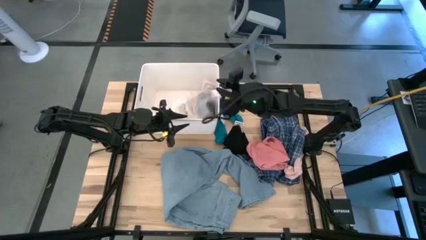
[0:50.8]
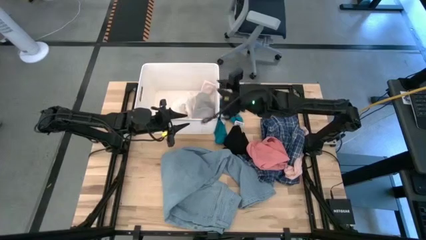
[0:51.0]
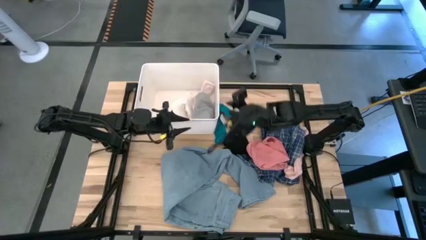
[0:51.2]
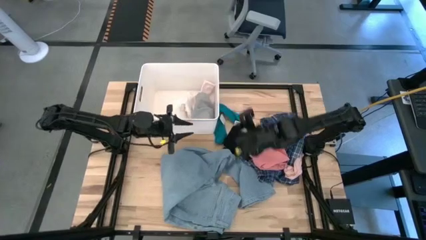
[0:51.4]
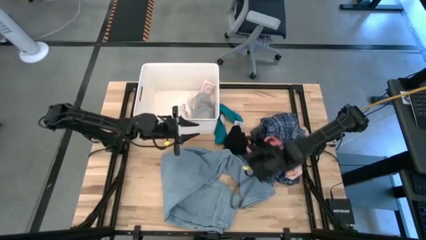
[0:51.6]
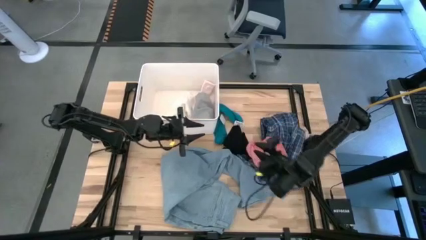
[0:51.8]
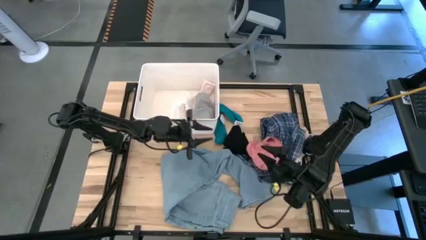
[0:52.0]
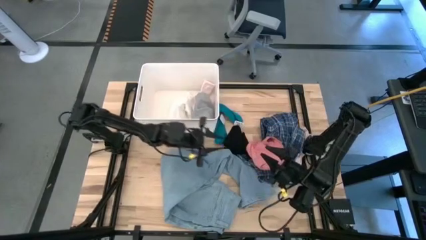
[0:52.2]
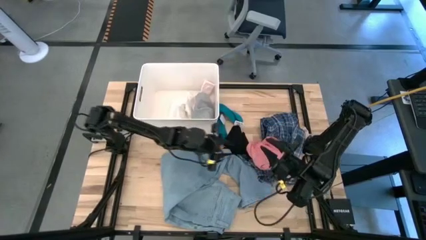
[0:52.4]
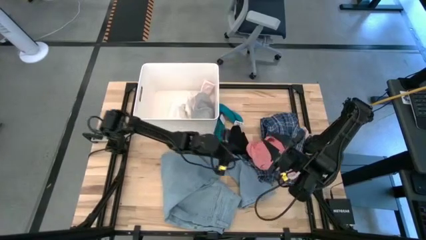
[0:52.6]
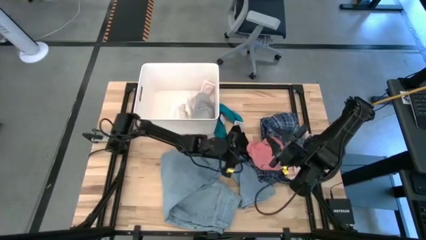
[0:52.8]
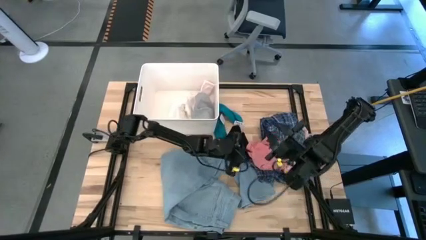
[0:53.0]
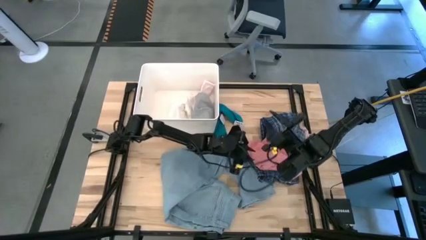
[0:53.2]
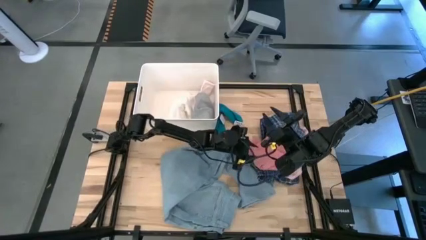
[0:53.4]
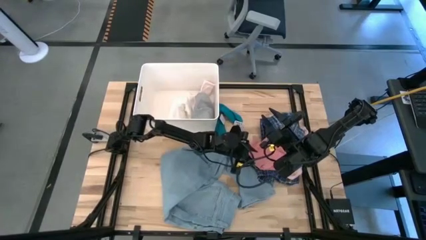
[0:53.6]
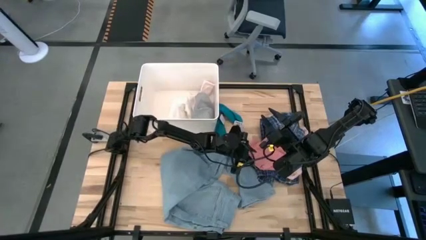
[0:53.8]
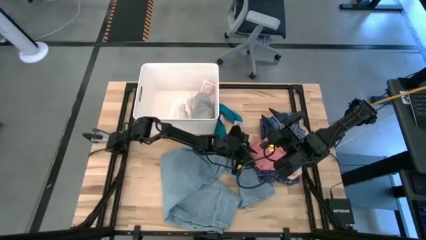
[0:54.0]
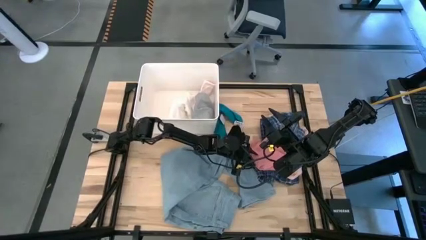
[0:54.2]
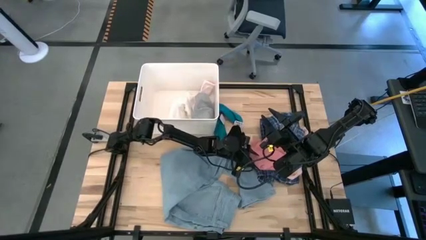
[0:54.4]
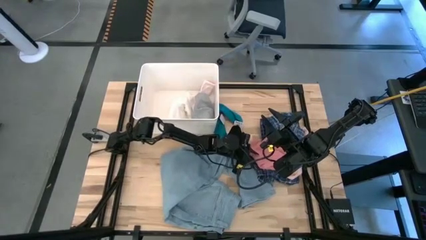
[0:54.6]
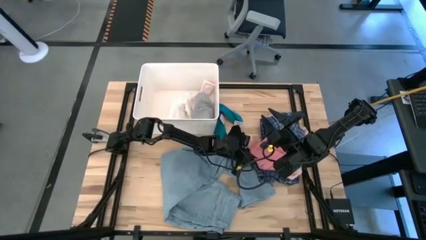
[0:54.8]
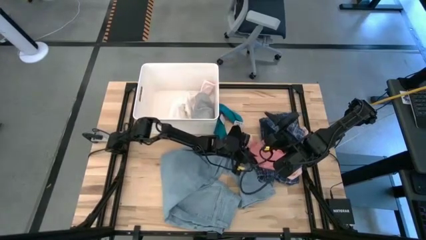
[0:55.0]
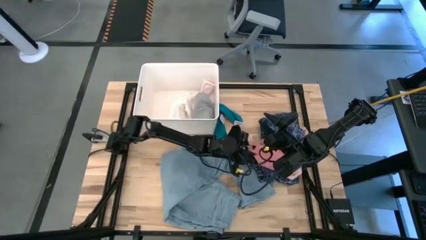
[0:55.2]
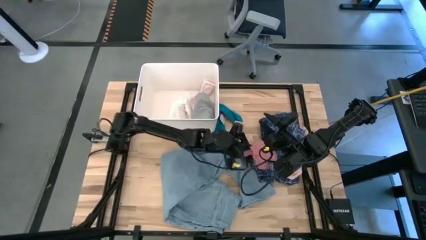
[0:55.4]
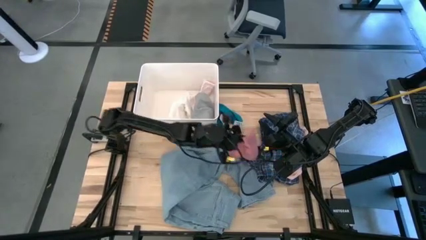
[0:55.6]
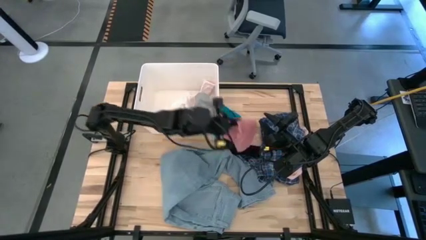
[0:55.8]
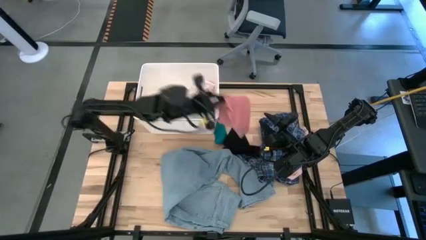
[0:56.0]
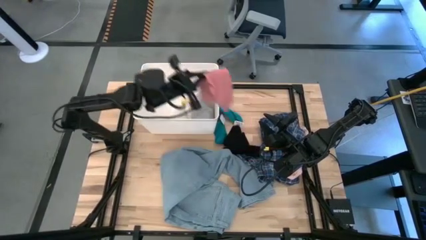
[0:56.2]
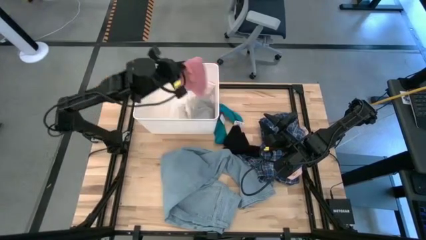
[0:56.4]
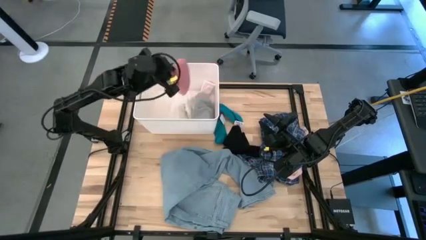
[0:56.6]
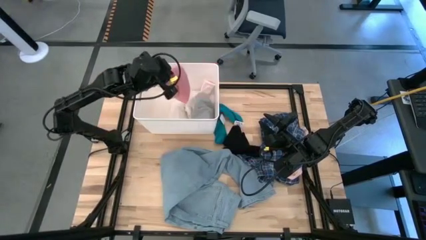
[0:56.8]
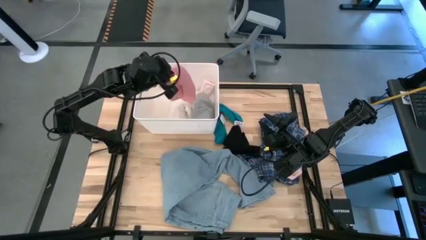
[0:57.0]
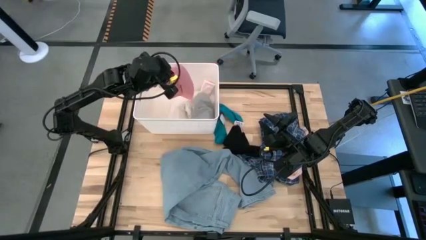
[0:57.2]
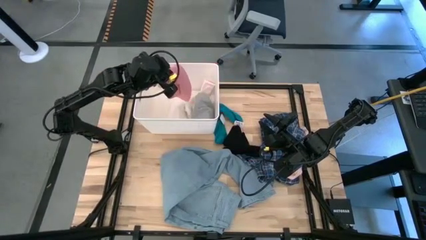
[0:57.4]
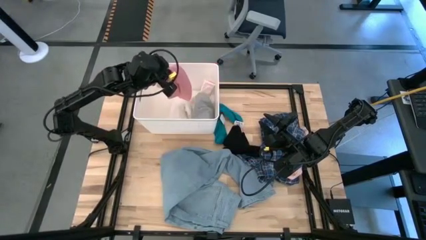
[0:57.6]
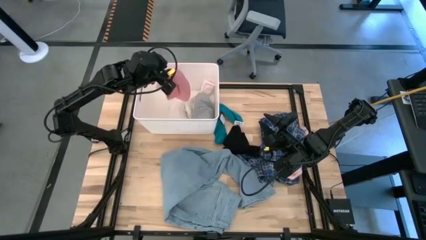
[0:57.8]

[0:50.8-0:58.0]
Task: Sort clothes
Put the pink shorts into the white bin

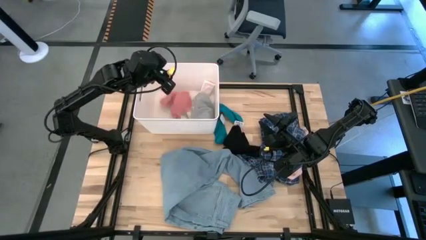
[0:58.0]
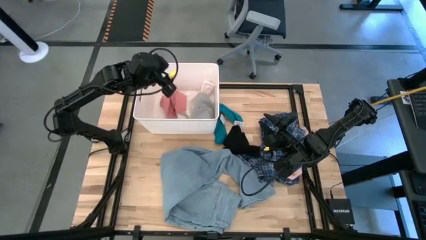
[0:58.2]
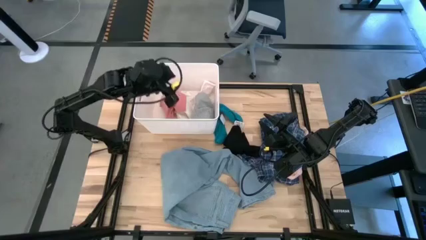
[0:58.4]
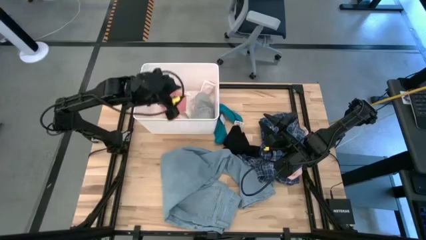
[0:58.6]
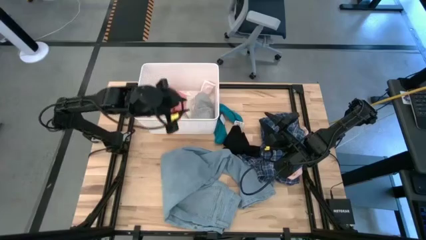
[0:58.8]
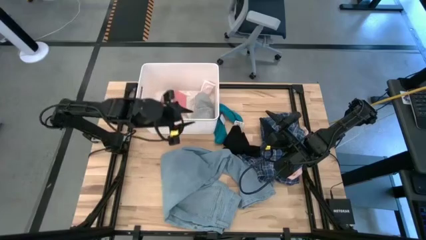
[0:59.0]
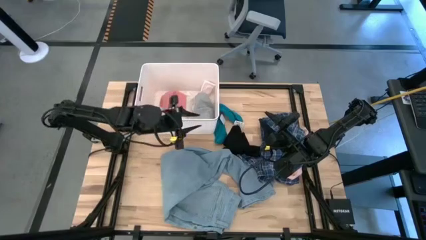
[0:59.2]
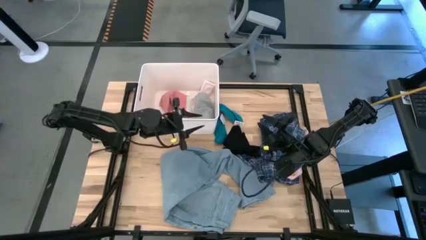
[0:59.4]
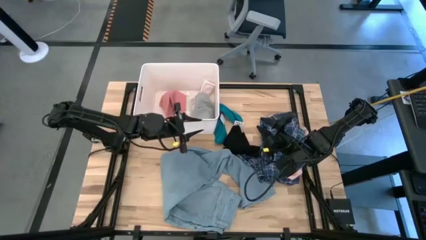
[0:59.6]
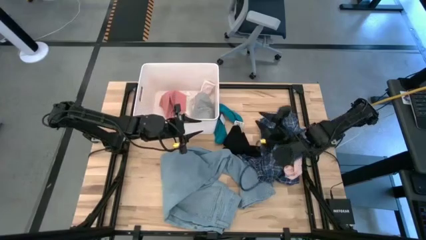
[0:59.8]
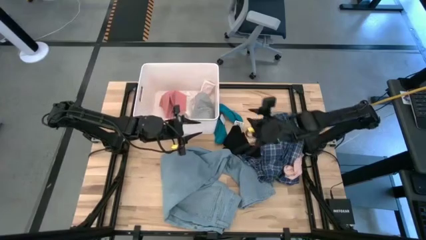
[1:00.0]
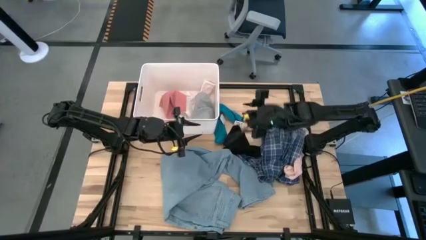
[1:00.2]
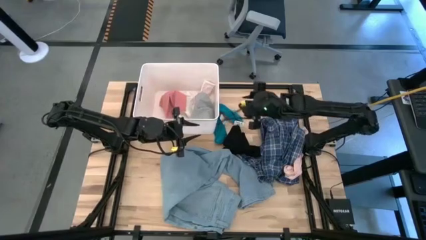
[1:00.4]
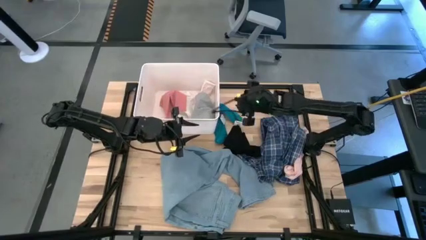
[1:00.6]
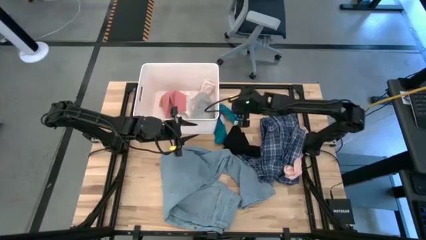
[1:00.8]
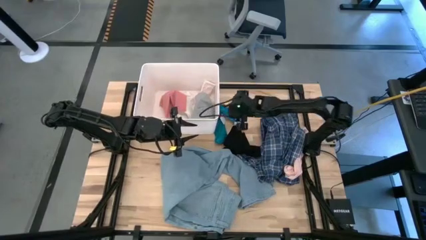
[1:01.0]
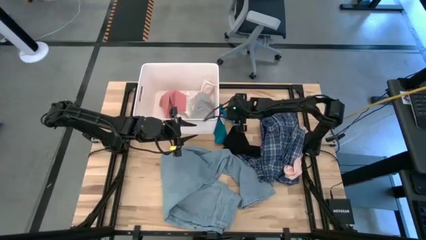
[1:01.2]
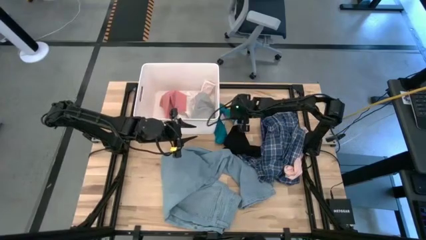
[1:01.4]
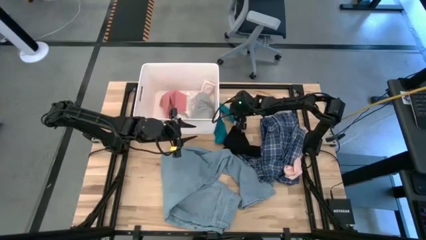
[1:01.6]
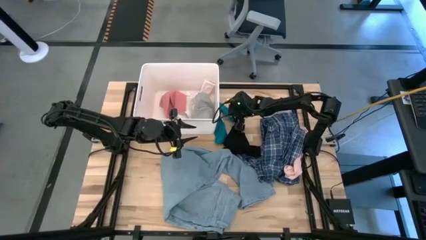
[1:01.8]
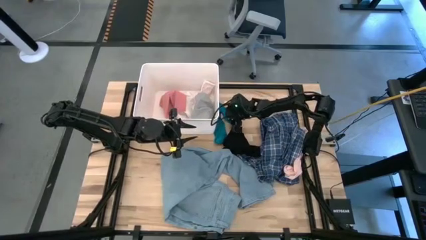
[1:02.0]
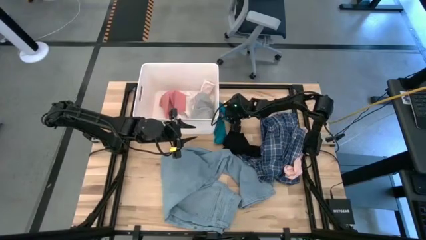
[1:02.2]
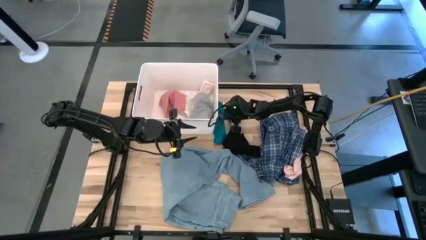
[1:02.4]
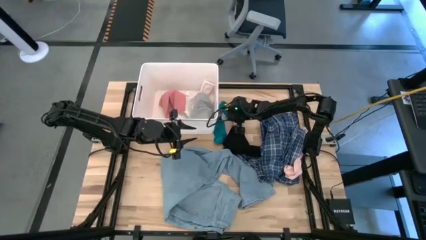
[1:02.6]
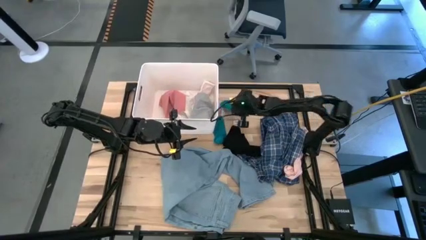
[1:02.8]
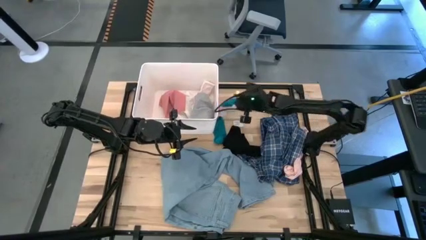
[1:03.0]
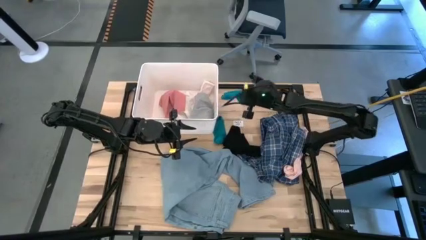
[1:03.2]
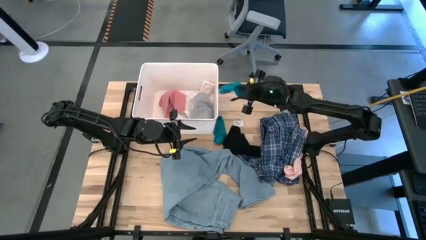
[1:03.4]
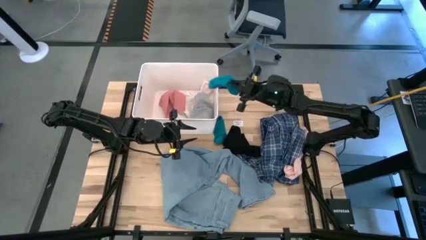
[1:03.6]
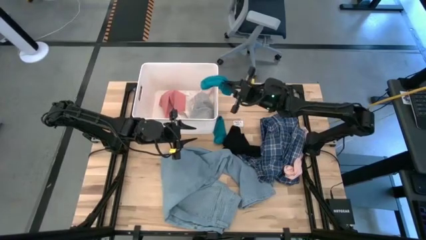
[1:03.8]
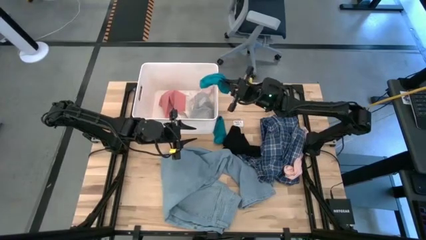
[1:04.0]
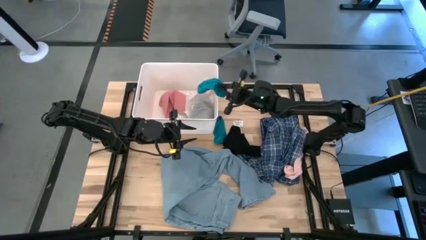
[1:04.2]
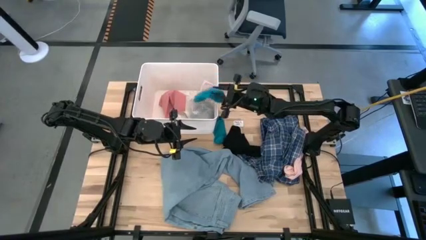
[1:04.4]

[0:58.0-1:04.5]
Put the right blue sock into the white bin

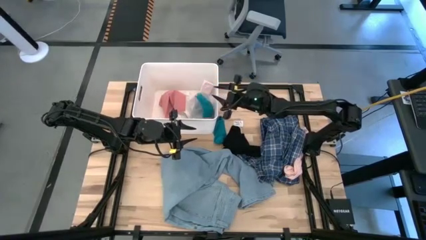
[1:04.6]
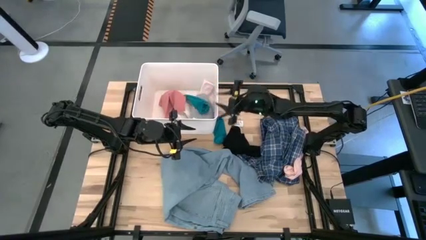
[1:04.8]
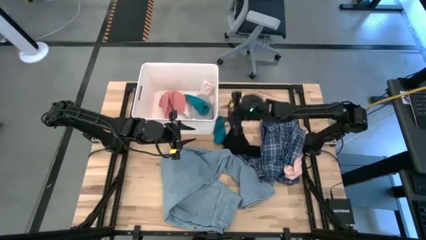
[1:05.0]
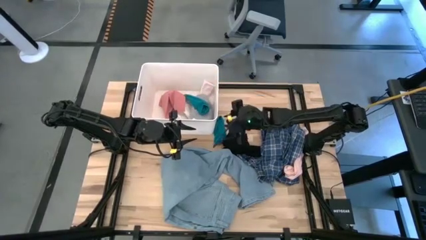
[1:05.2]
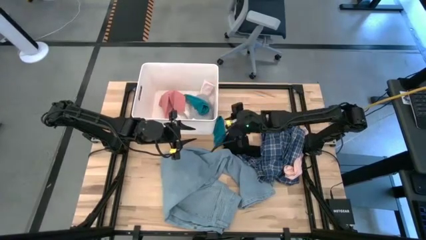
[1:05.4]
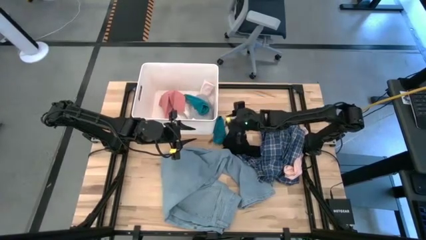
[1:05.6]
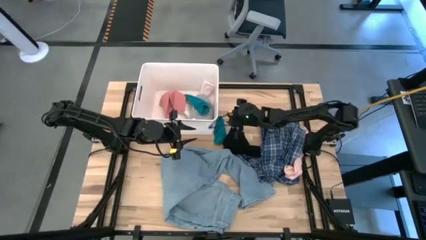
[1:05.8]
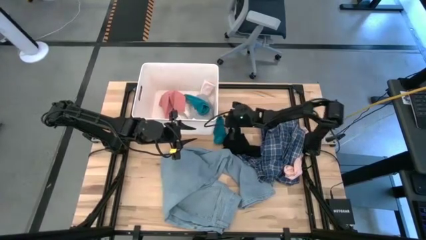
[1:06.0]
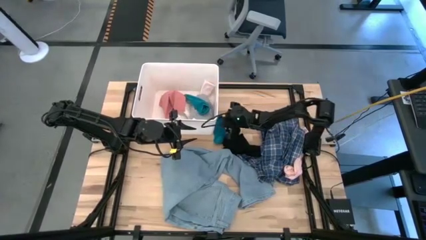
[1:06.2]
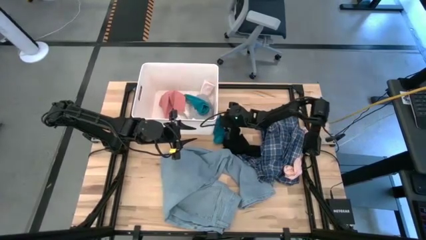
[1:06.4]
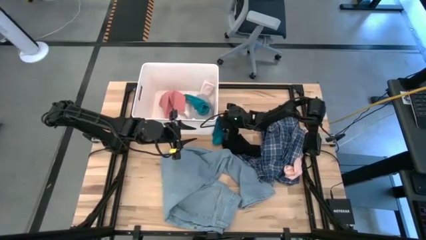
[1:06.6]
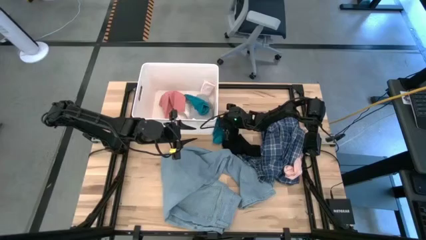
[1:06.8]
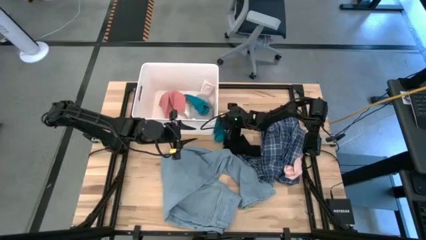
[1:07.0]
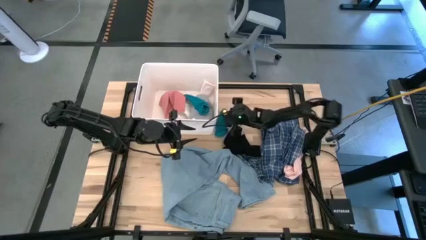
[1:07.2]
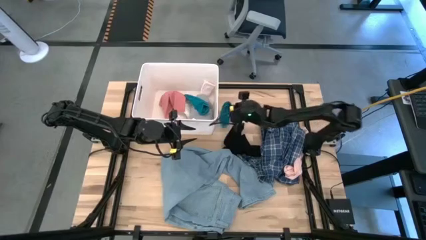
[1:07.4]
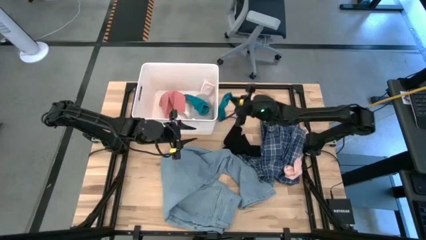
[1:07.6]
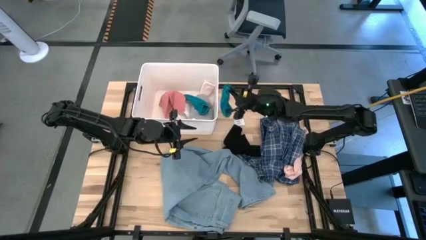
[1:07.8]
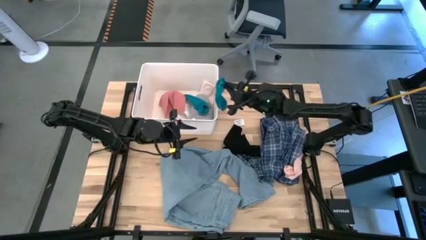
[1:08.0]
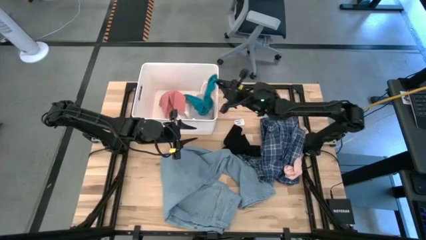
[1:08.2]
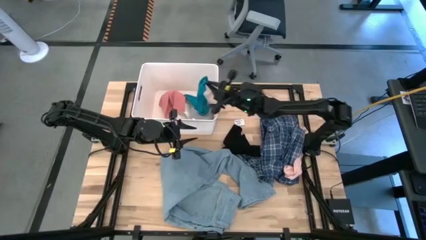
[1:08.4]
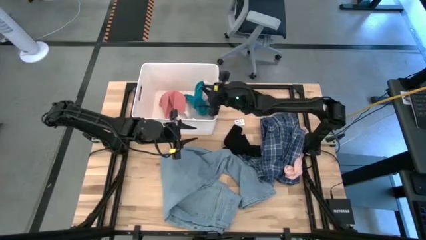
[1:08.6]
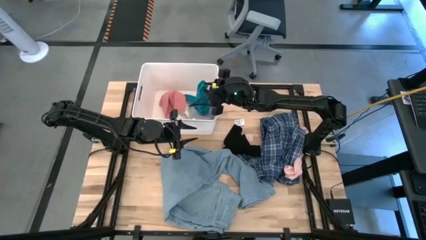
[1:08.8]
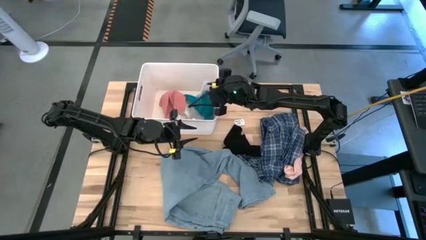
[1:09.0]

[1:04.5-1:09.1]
Put the left blue sock into the white bin
